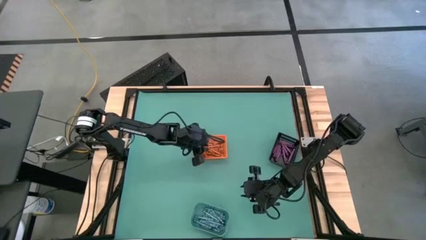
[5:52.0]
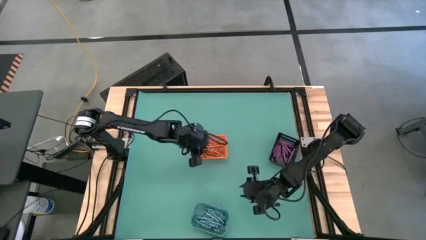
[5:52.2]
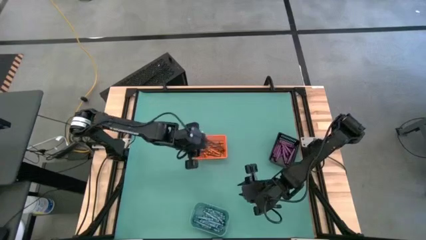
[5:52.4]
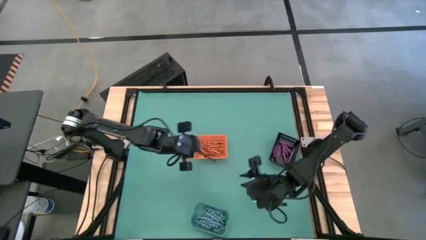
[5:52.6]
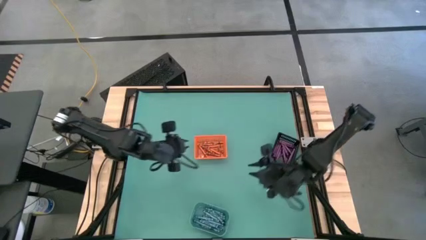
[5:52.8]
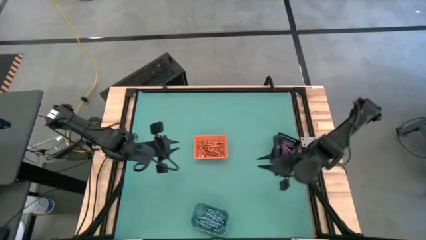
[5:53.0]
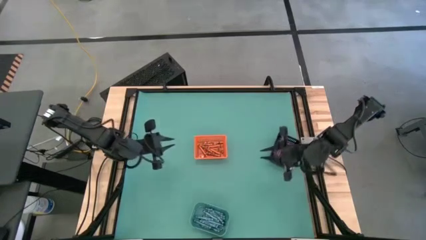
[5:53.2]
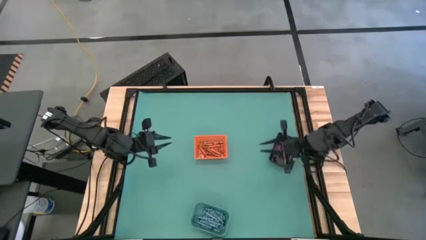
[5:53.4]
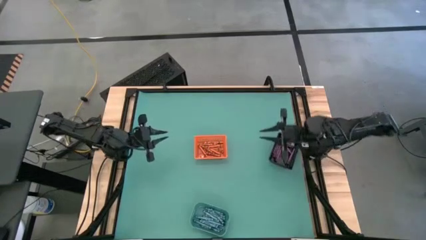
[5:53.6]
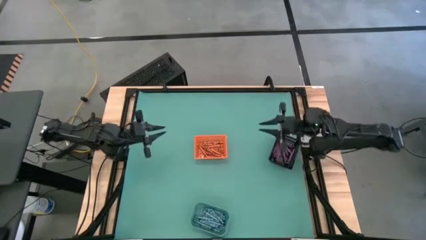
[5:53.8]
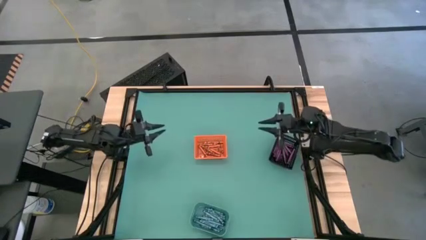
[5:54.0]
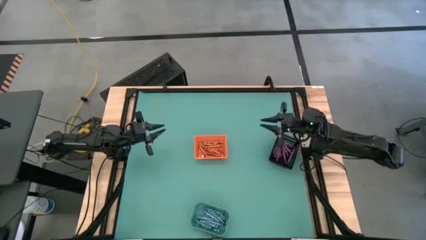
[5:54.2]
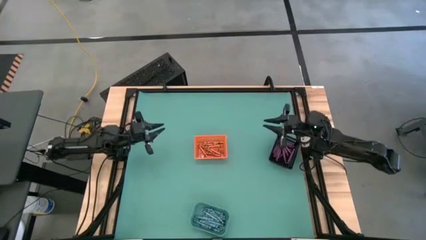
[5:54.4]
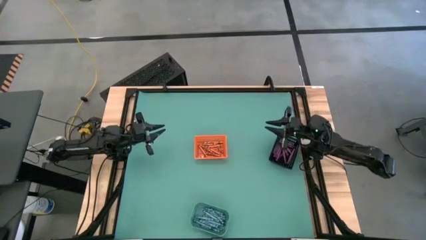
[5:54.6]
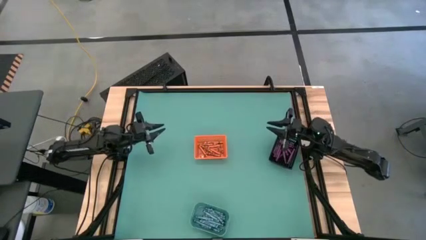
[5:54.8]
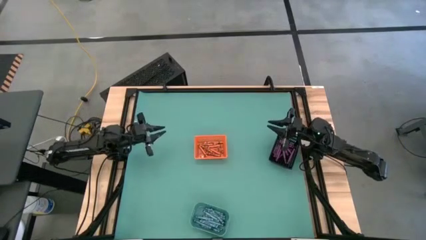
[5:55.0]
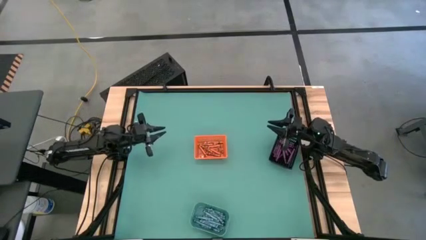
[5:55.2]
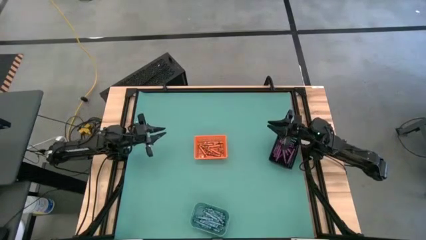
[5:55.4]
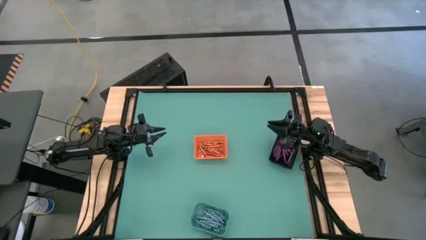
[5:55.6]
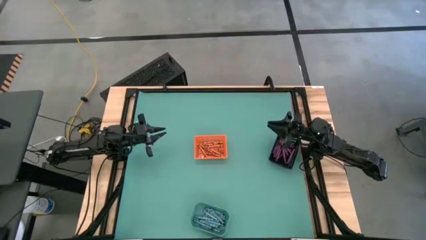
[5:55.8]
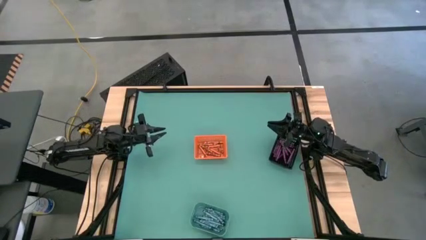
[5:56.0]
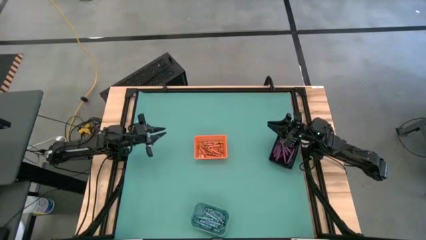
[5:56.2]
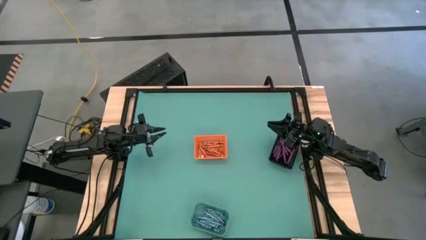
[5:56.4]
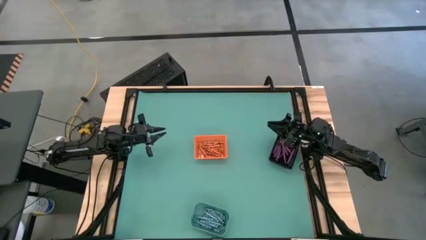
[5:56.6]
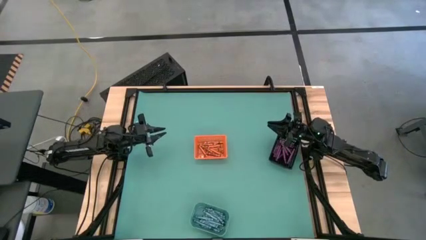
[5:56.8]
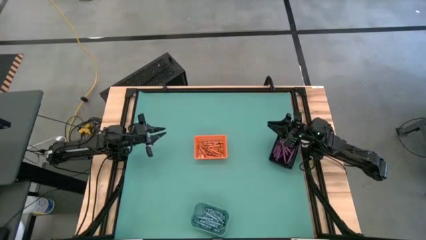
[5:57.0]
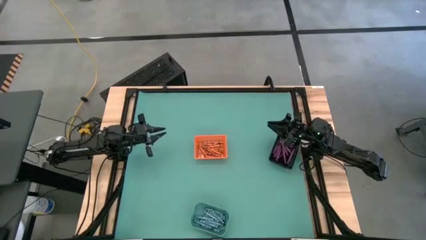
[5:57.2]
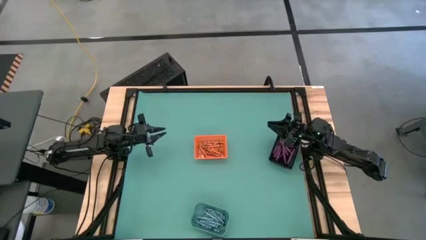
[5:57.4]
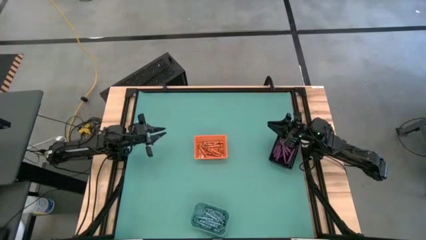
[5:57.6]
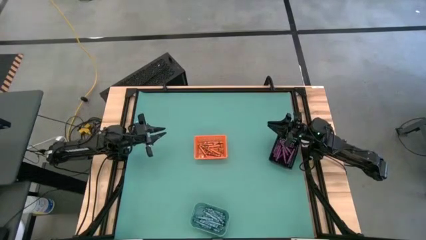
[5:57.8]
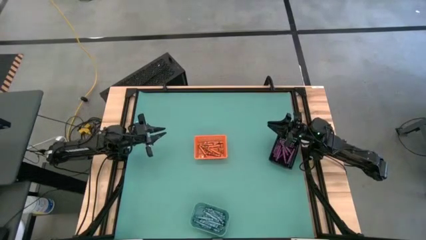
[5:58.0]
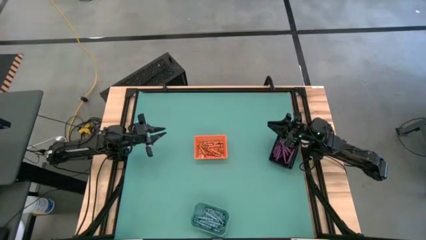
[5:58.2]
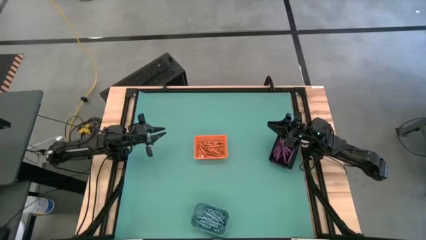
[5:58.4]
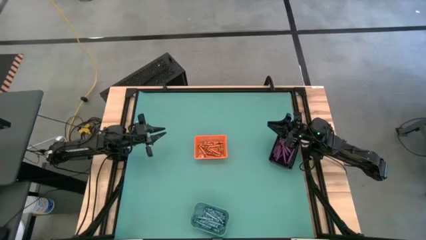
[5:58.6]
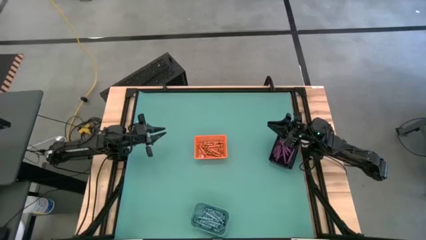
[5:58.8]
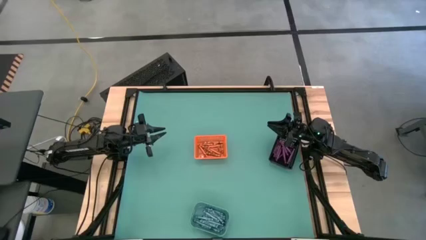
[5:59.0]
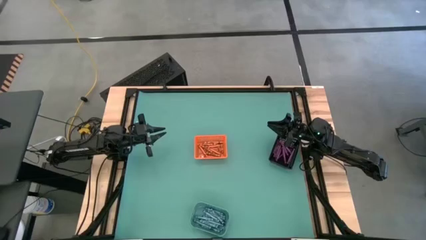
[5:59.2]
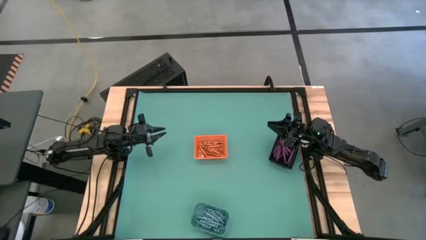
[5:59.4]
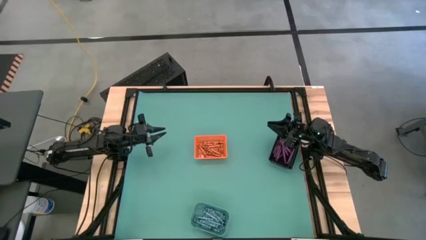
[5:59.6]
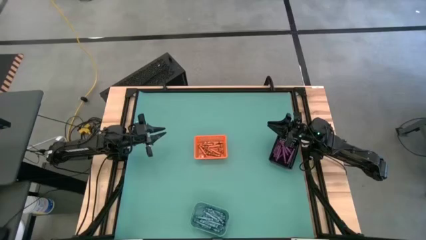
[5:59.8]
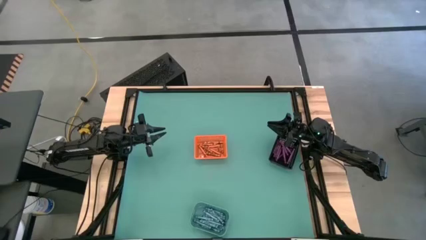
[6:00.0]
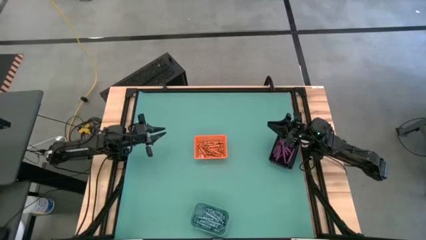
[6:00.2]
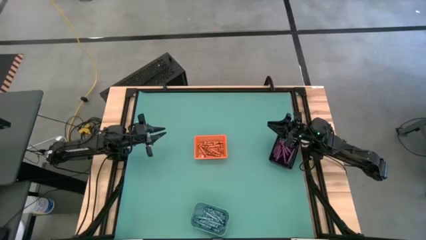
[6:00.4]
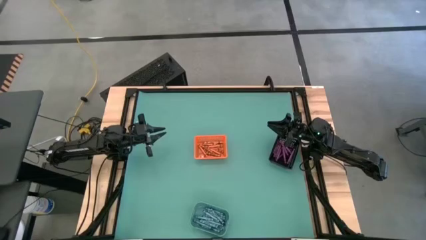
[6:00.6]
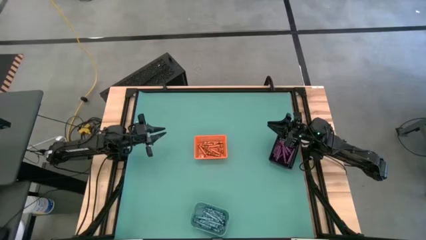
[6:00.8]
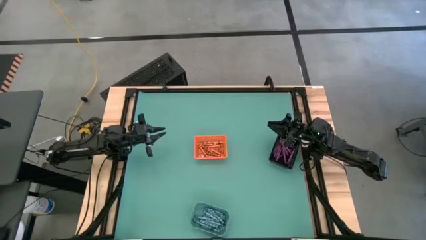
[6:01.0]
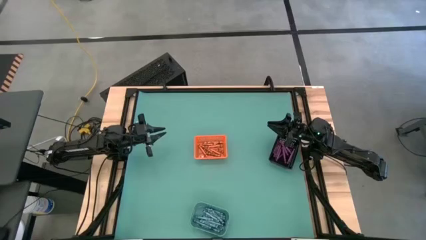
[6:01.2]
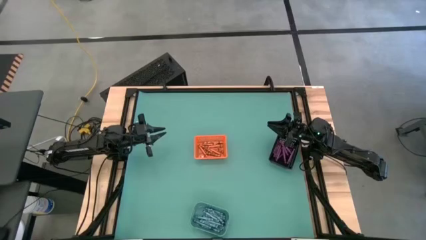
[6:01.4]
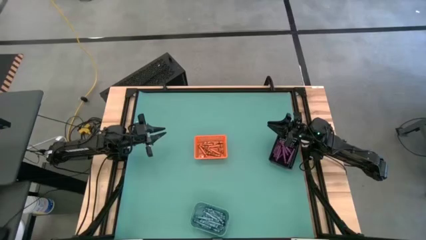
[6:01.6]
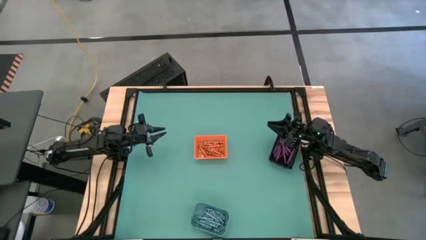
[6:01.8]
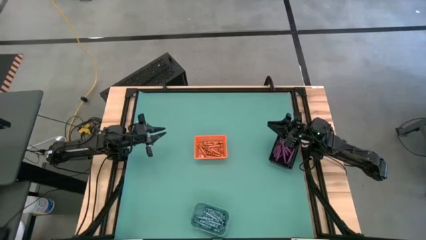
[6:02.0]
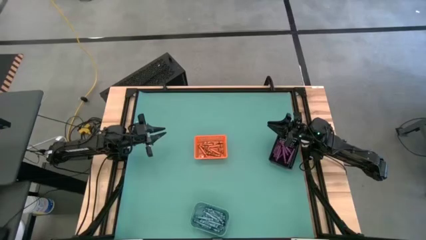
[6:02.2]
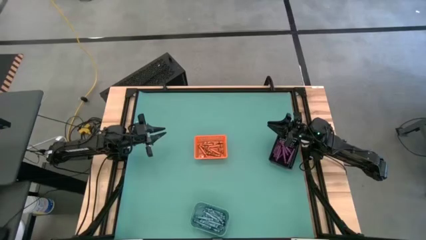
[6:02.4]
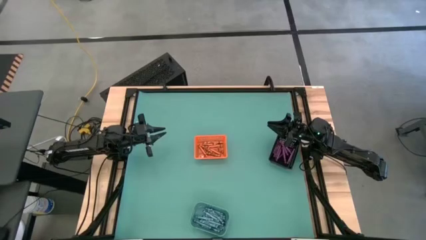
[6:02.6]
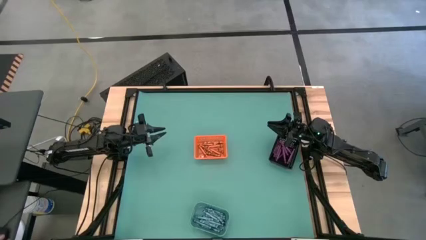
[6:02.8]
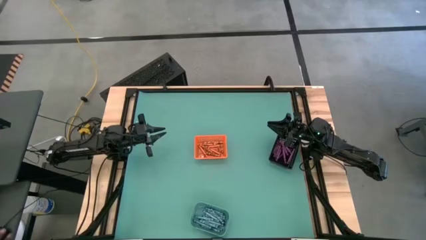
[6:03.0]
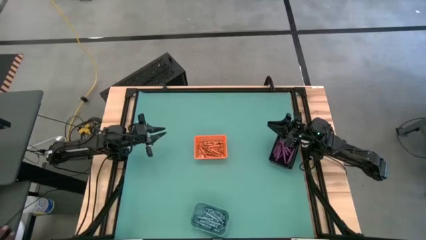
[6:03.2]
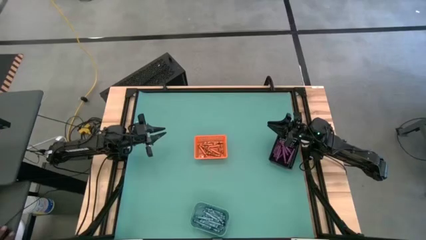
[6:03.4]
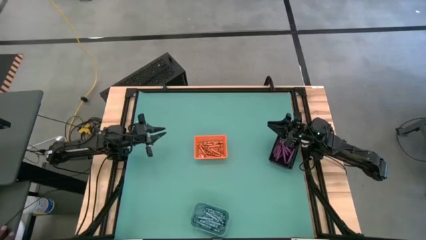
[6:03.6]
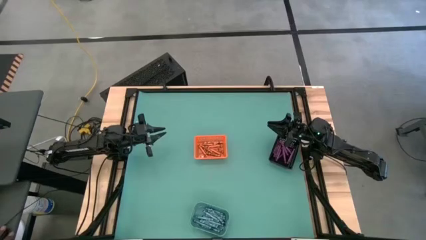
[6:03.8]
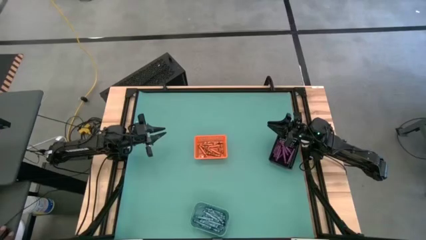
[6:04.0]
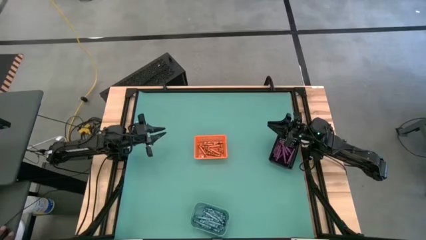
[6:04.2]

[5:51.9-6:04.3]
Task: Sort crayons
Return to Home Position

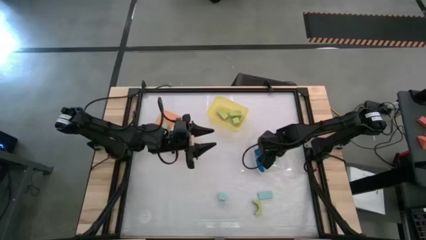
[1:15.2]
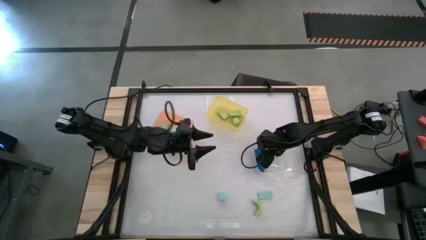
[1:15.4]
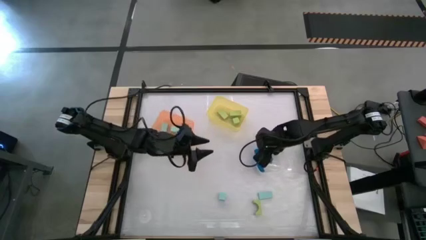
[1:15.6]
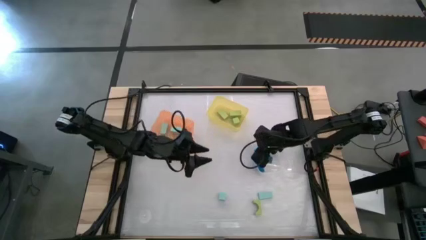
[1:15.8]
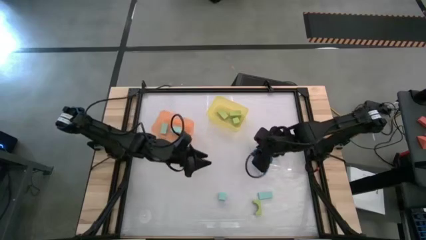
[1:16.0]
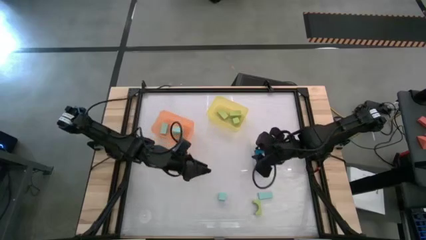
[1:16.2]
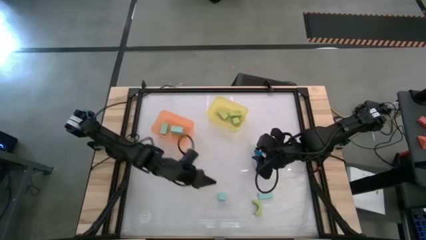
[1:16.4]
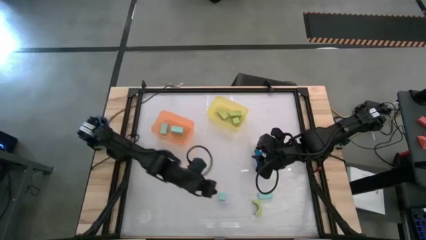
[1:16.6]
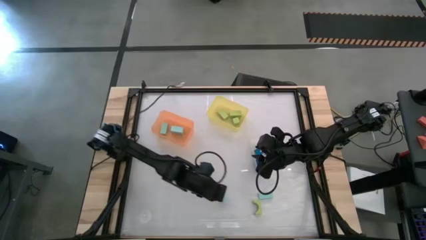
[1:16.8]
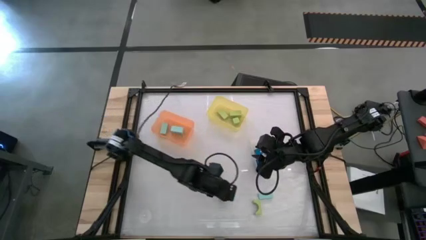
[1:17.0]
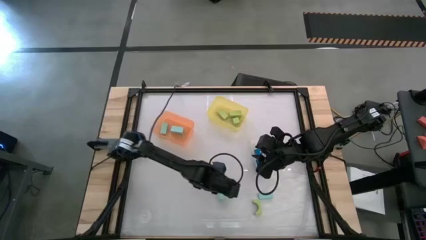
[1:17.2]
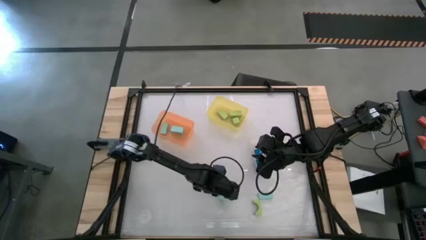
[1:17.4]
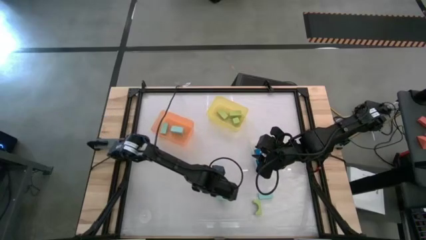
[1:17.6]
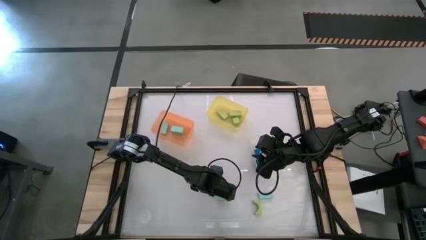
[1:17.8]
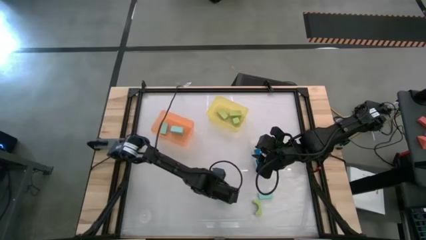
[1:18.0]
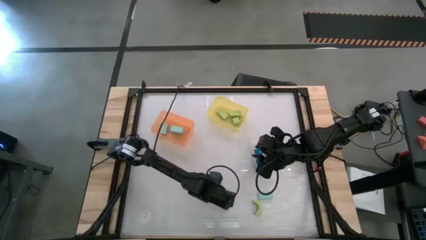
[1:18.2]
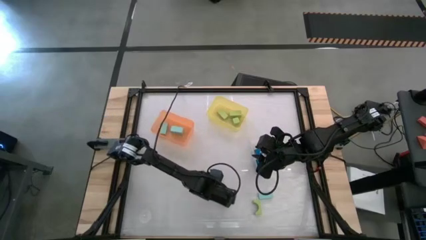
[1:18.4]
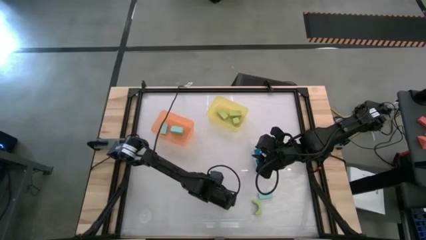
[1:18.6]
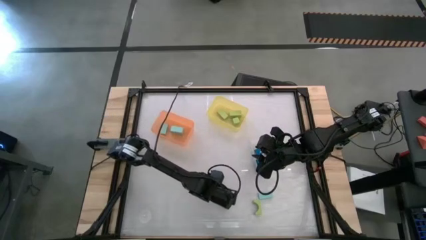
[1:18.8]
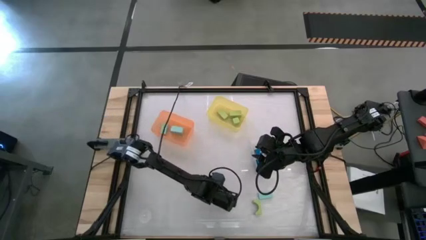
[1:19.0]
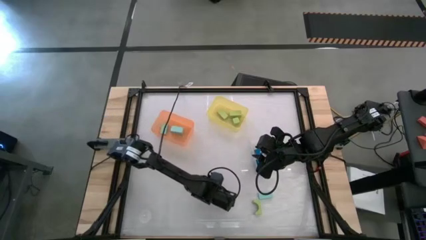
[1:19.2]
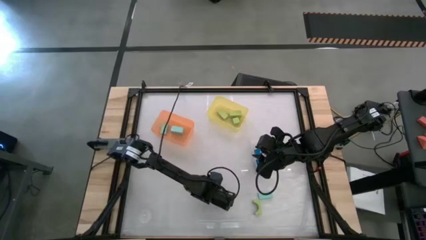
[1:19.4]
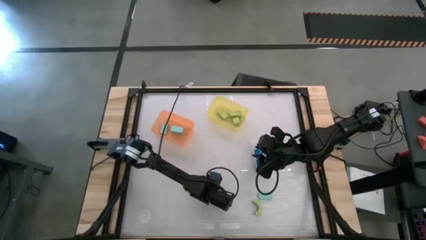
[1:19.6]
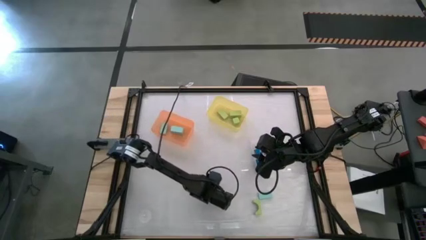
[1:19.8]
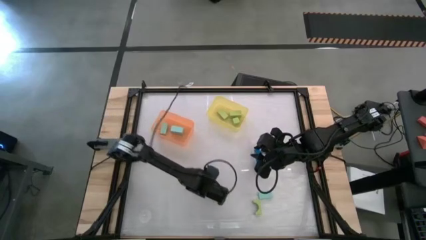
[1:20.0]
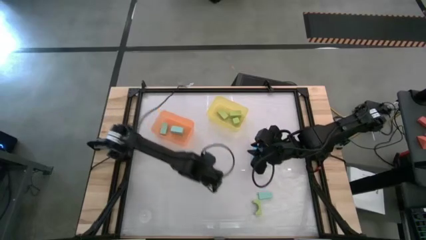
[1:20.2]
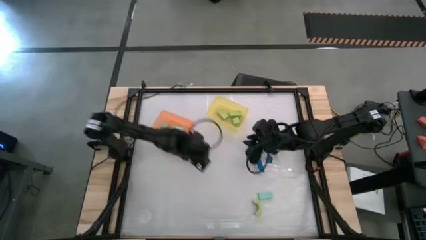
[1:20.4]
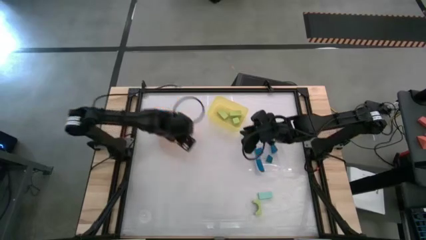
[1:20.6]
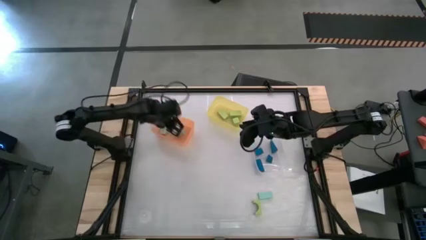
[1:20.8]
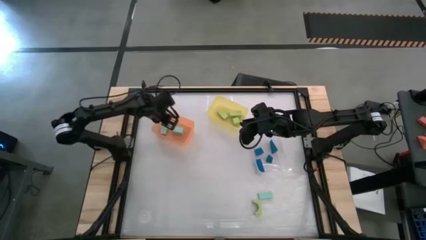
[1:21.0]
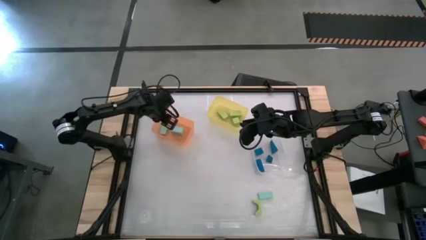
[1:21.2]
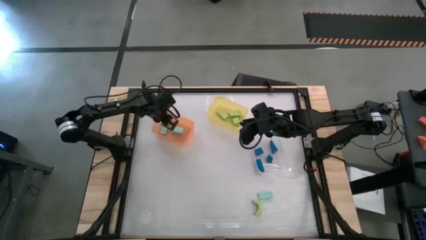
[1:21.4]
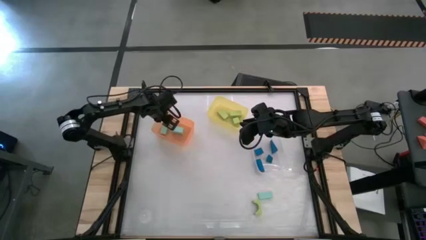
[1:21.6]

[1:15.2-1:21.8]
Task: Sort & place blocks by color
Put the light blue block into the orange bin
